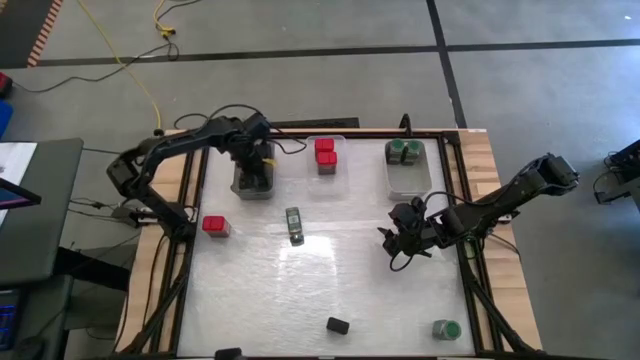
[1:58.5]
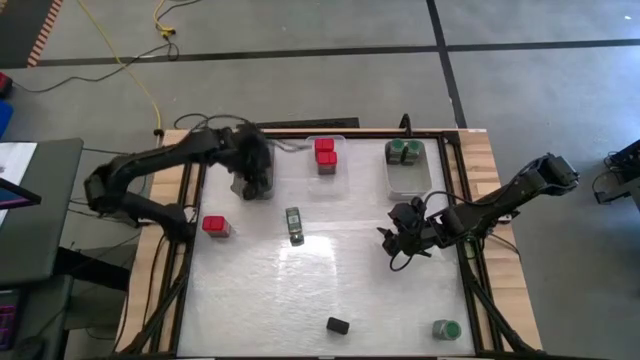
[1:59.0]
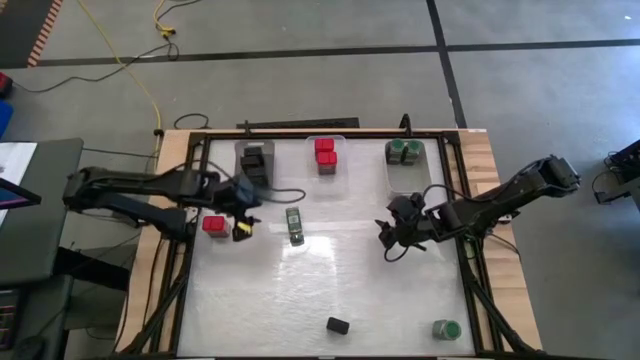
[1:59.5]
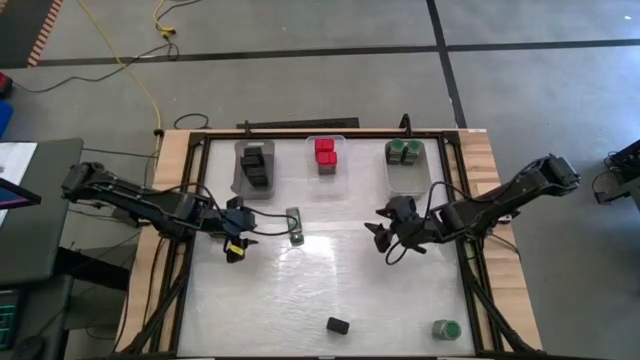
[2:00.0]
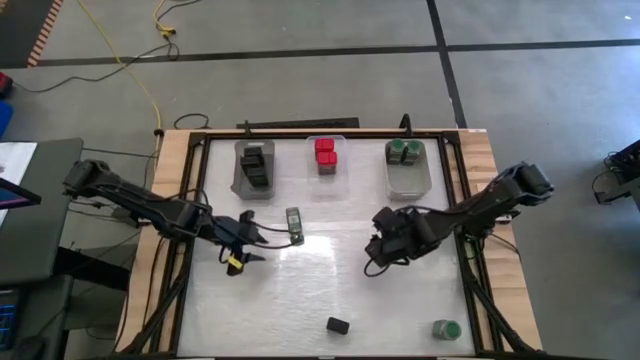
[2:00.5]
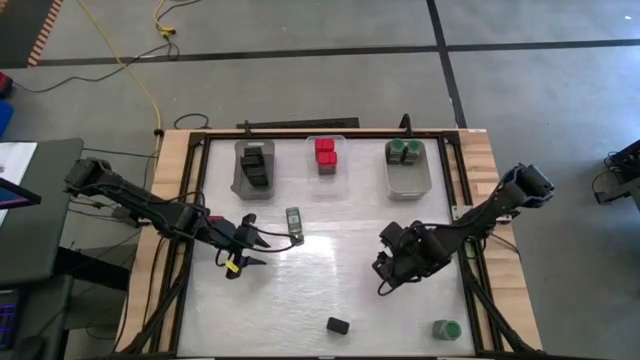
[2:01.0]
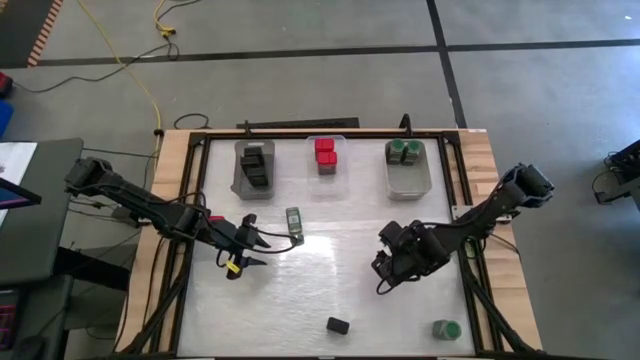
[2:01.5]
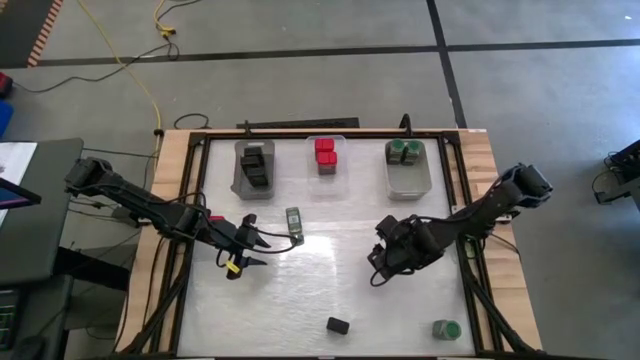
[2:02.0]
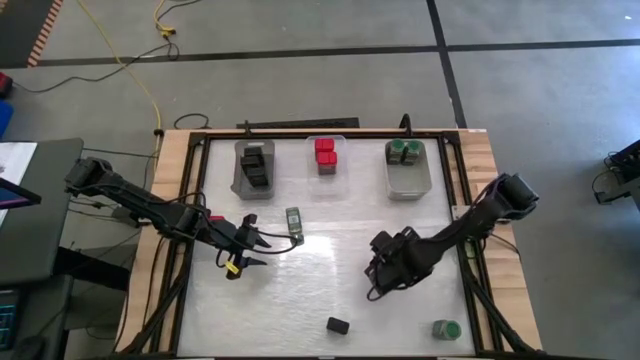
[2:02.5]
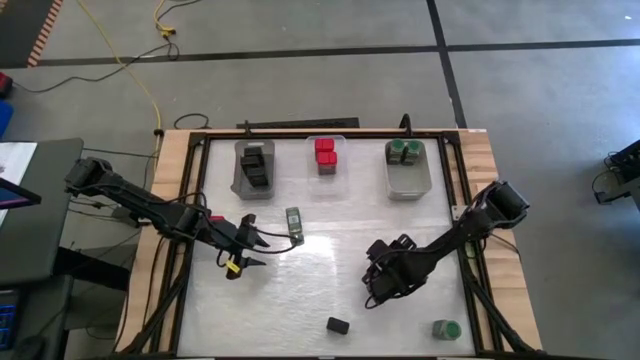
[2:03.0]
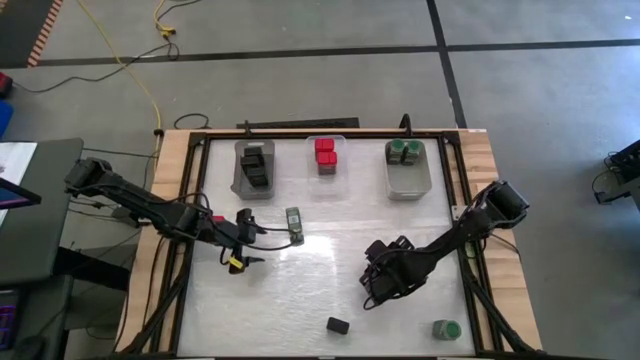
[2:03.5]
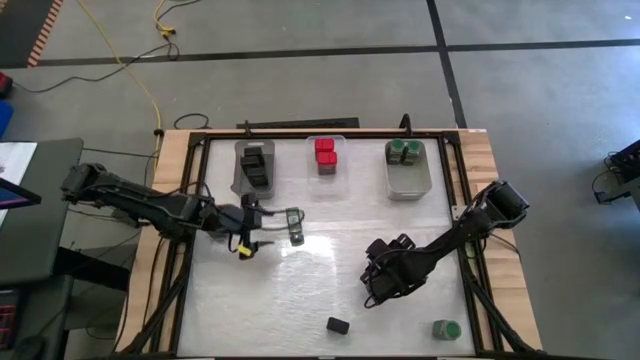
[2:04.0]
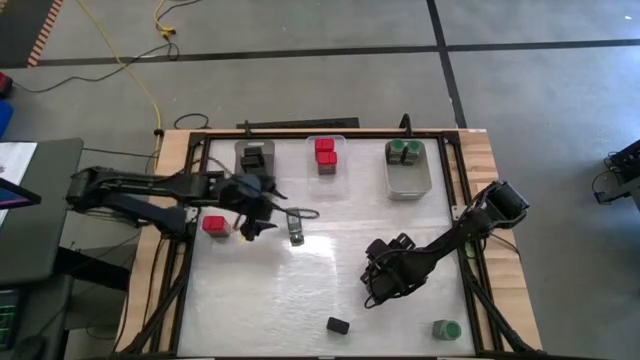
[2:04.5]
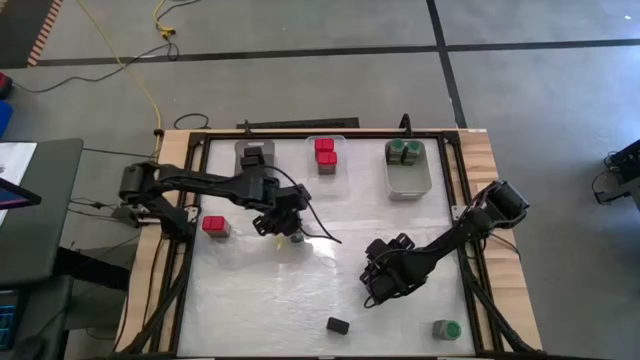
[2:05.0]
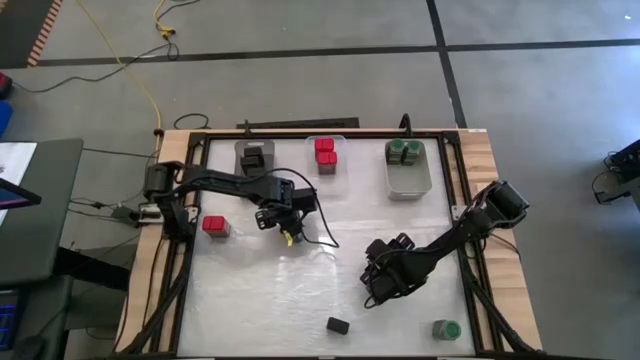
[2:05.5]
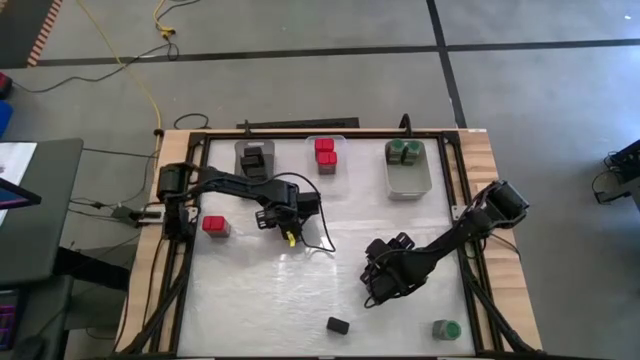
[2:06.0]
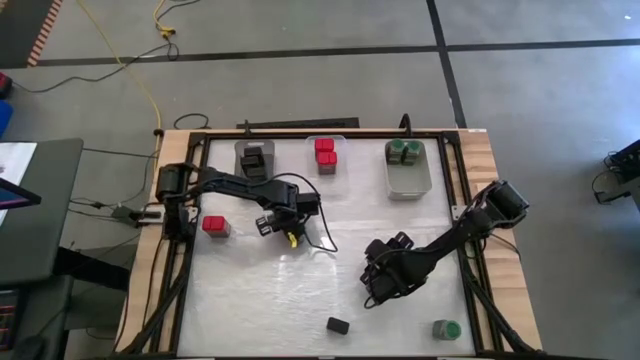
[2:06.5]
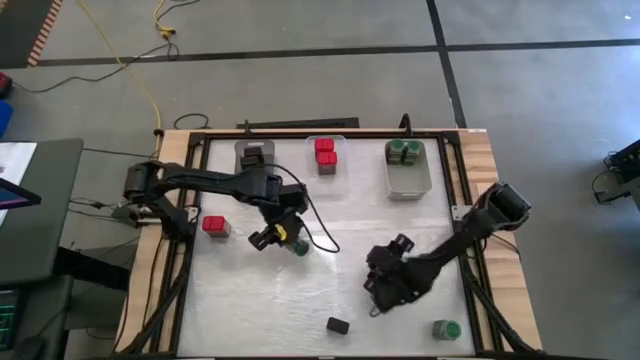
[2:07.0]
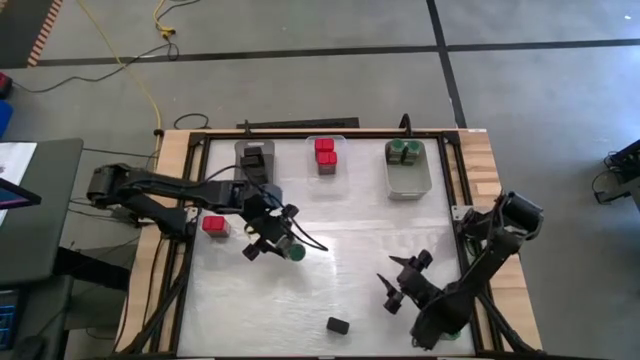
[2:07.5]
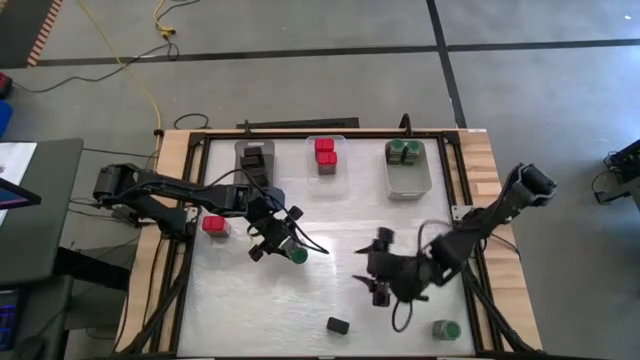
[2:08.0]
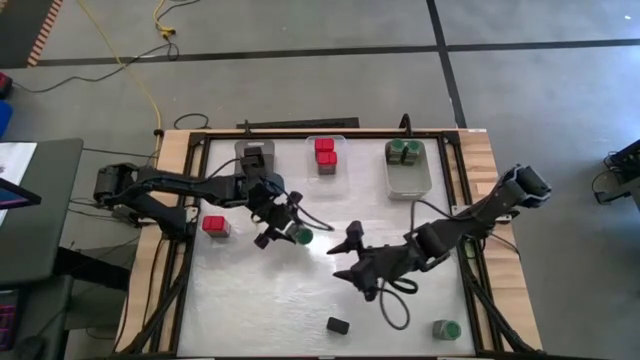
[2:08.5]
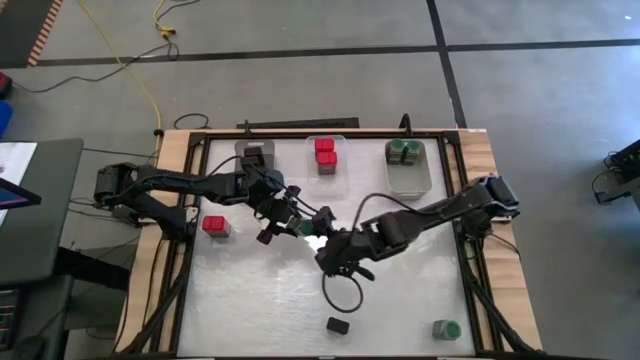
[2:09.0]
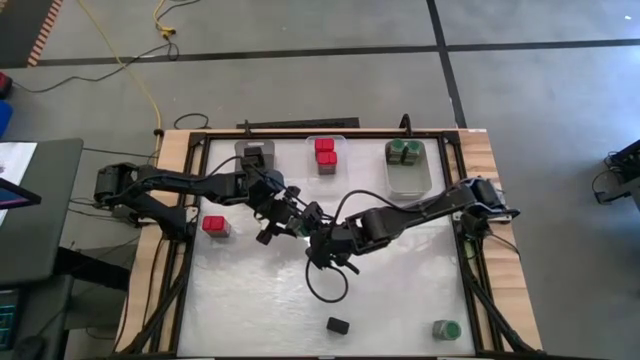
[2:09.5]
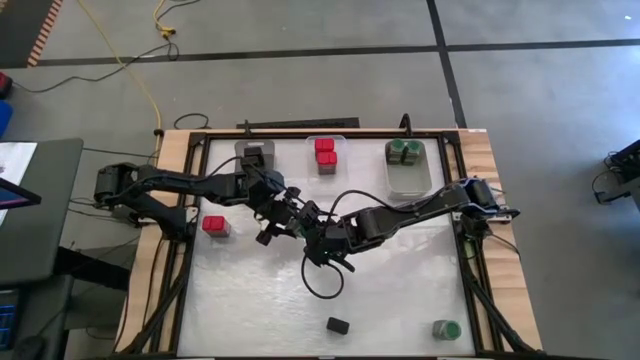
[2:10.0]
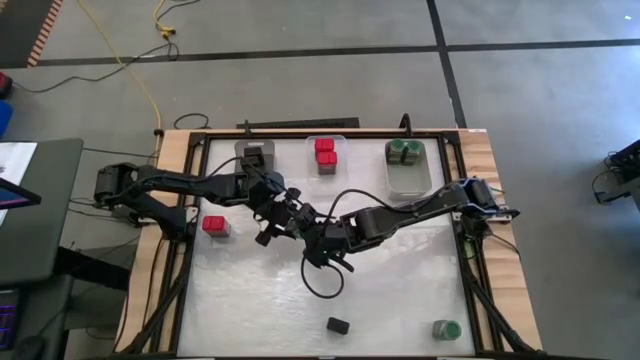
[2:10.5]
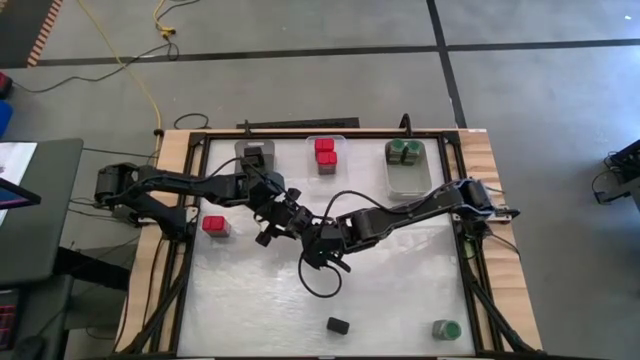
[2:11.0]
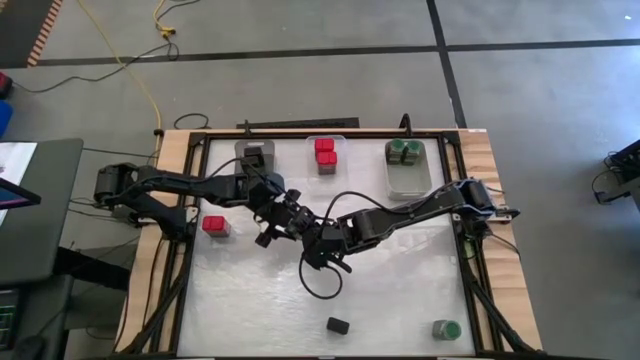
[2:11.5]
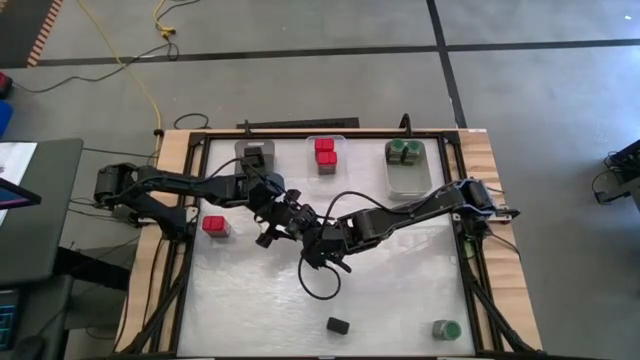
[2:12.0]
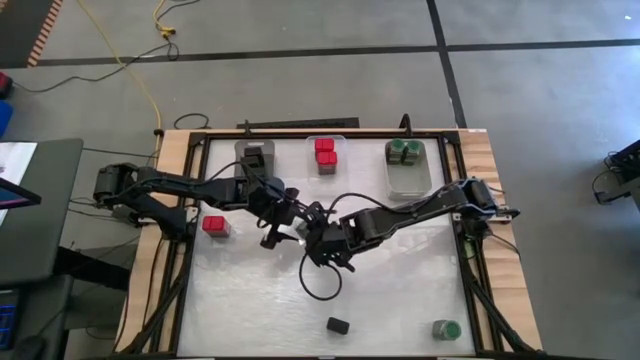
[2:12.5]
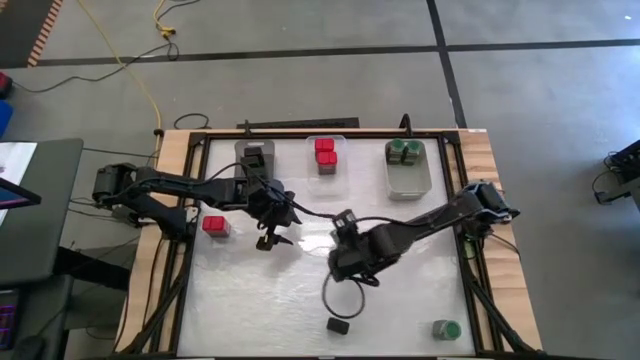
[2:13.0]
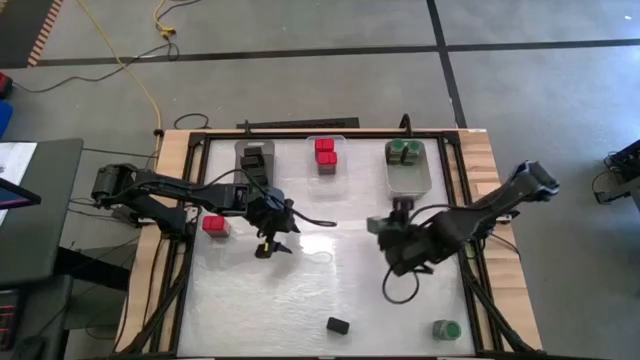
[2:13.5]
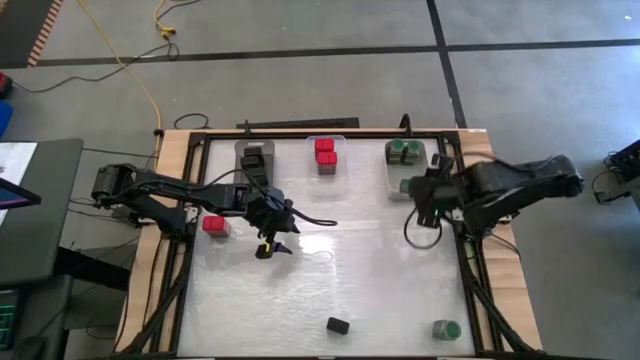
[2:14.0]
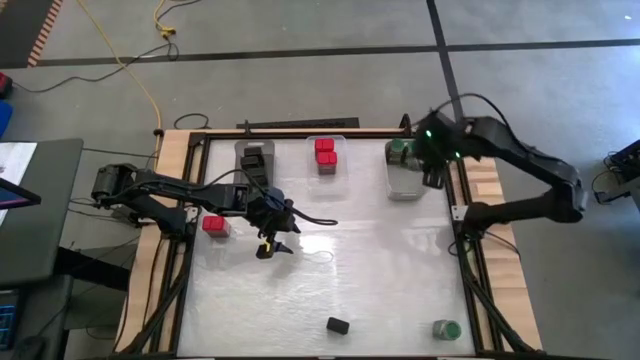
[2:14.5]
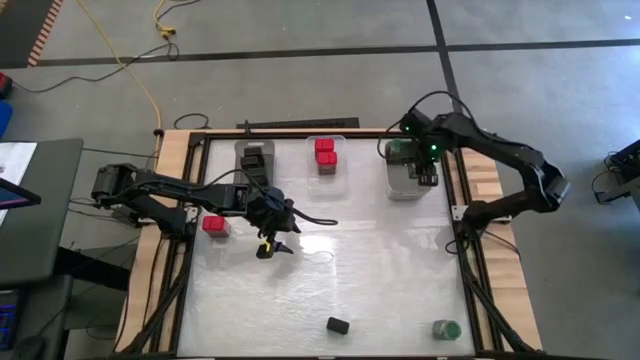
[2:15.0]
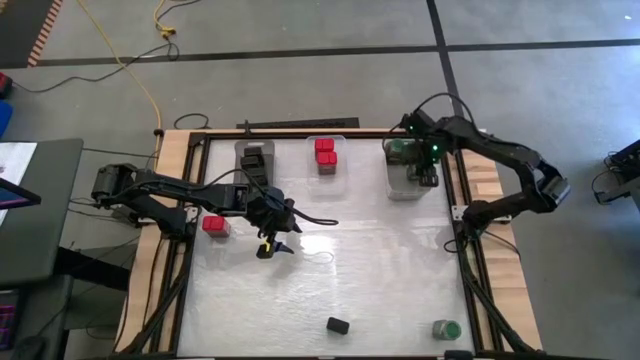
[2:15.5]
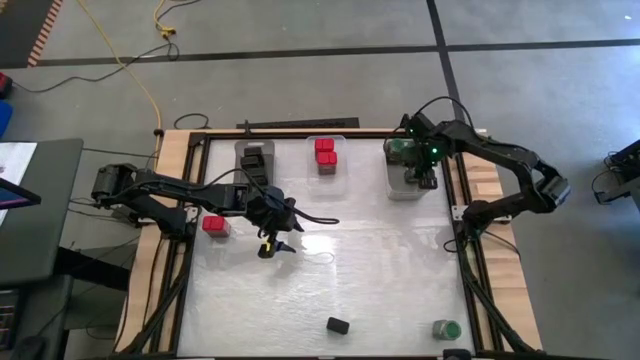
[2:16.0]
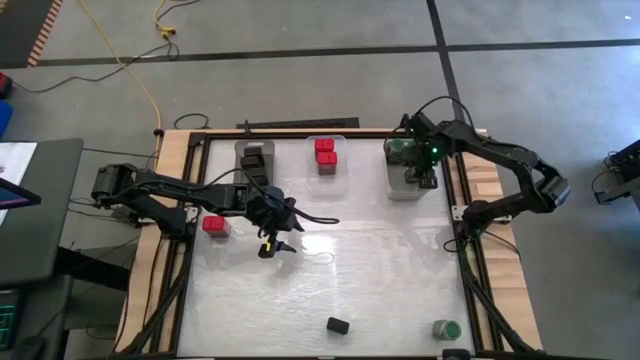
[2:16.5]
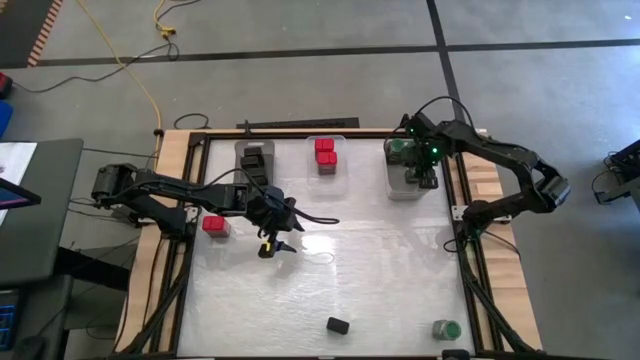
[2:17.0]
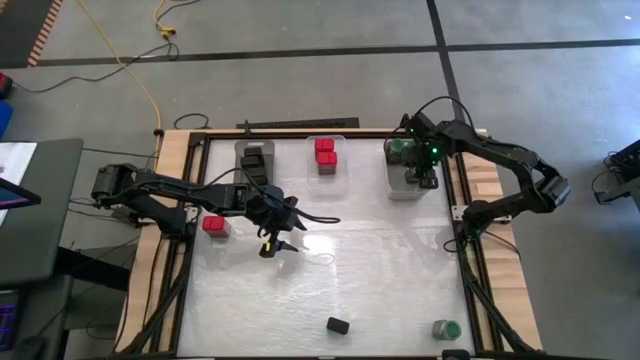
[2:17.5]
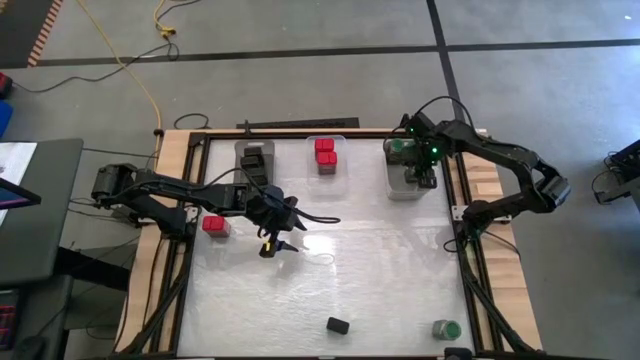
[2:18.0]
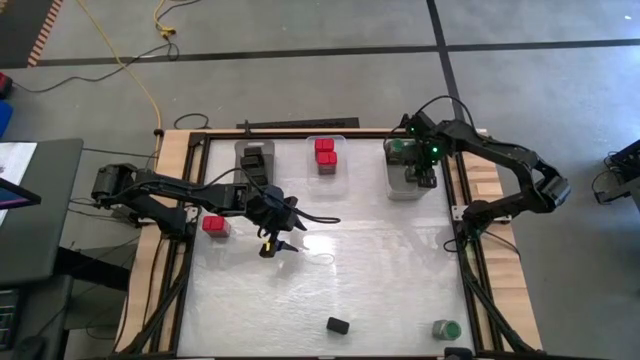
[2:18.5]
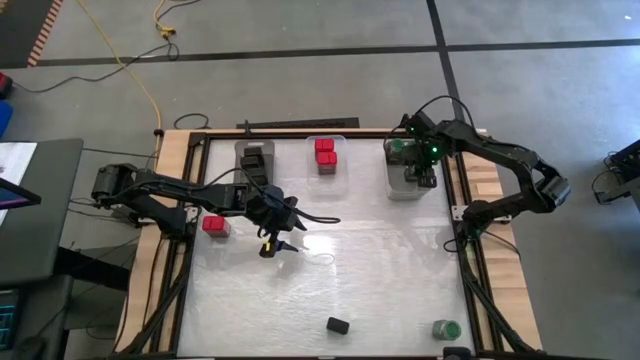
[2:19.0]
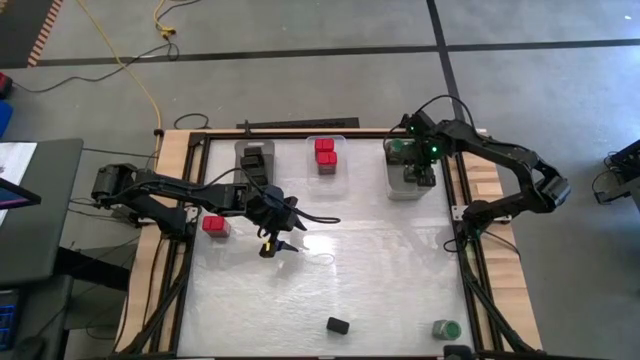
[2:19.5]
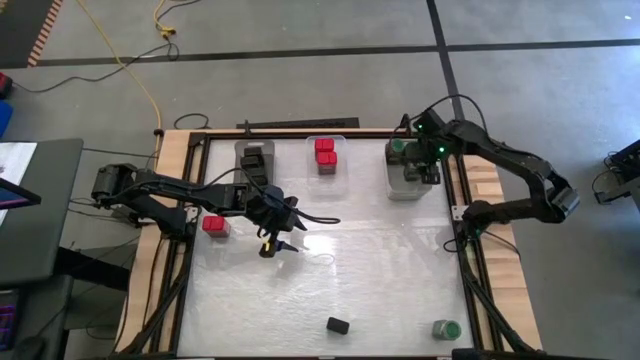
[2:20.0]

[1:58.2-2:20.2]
Task: Sort spices by type
Put the green seasoning bottle into the gray bin
